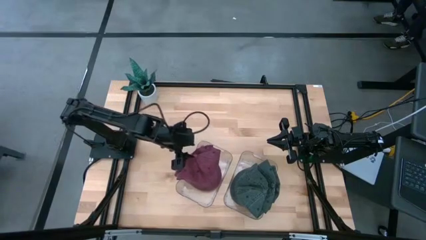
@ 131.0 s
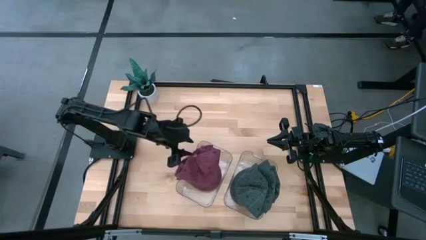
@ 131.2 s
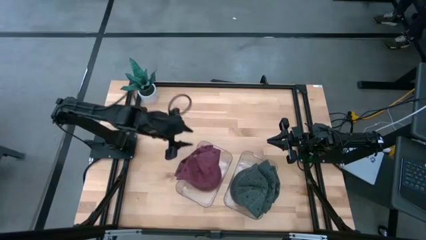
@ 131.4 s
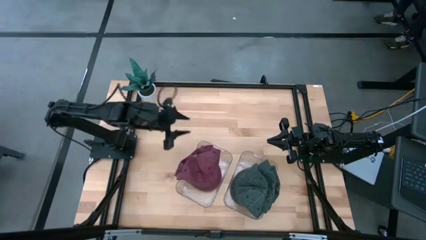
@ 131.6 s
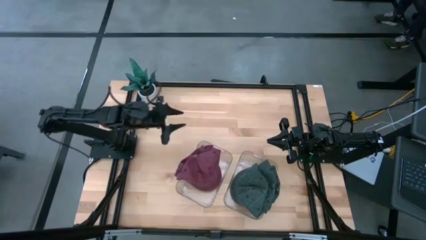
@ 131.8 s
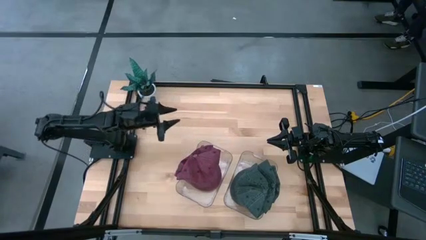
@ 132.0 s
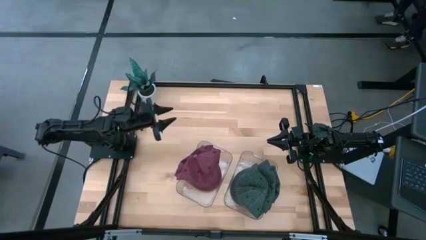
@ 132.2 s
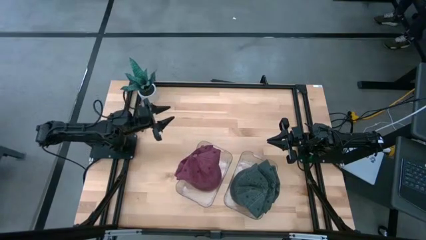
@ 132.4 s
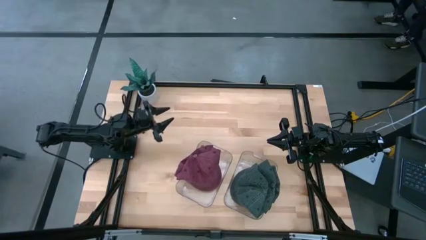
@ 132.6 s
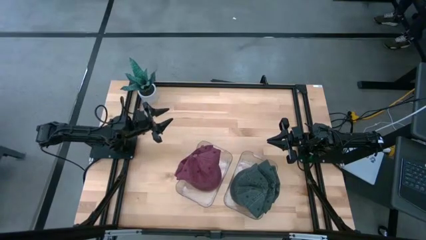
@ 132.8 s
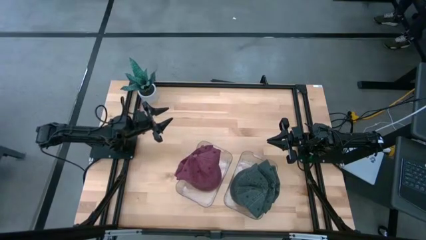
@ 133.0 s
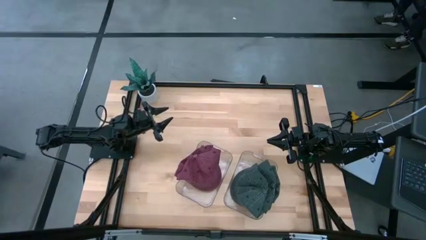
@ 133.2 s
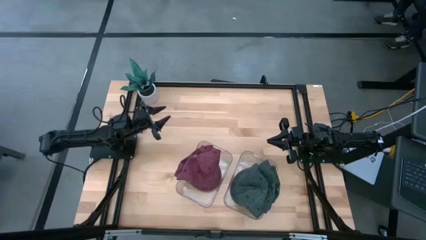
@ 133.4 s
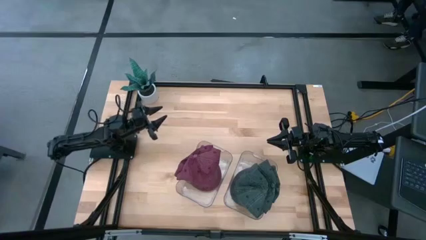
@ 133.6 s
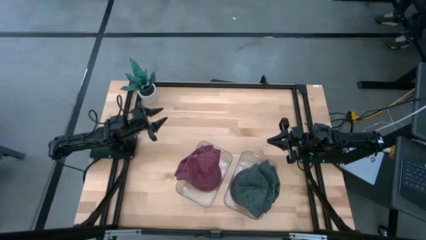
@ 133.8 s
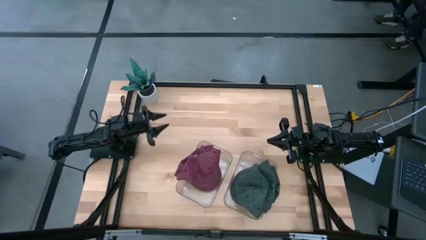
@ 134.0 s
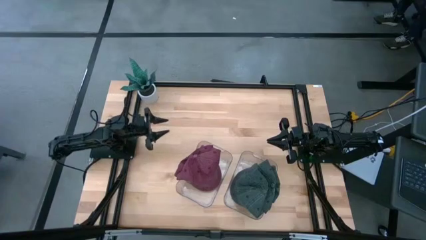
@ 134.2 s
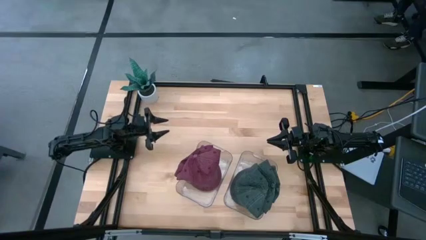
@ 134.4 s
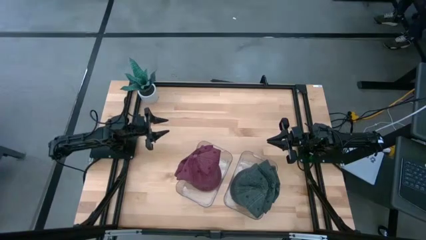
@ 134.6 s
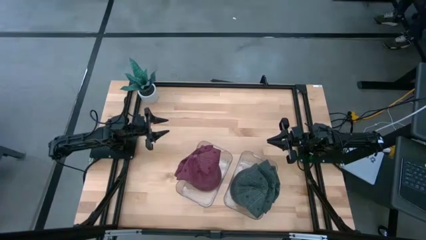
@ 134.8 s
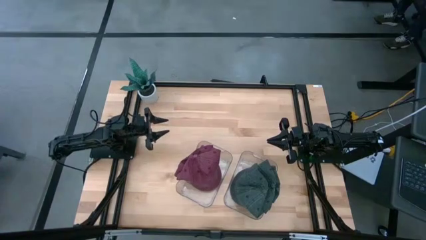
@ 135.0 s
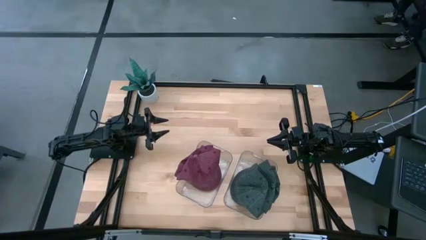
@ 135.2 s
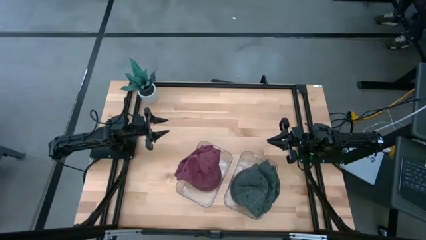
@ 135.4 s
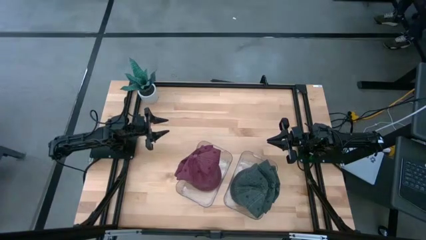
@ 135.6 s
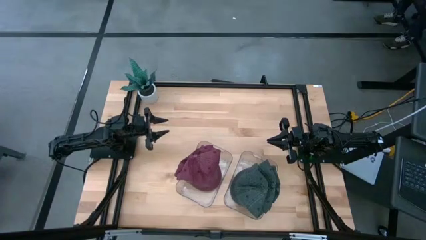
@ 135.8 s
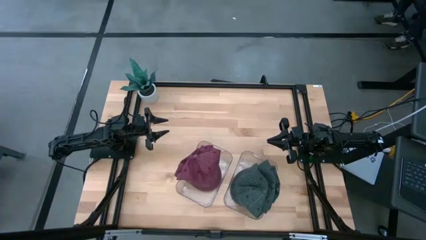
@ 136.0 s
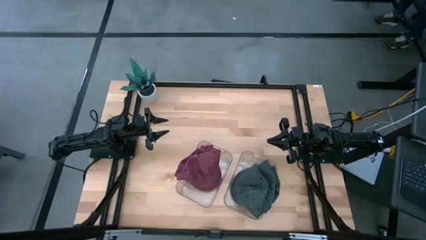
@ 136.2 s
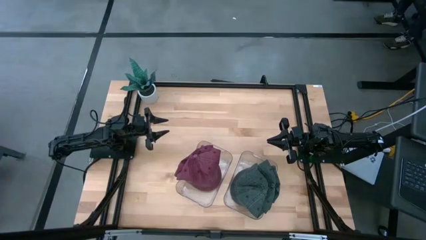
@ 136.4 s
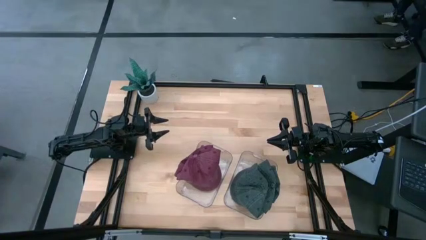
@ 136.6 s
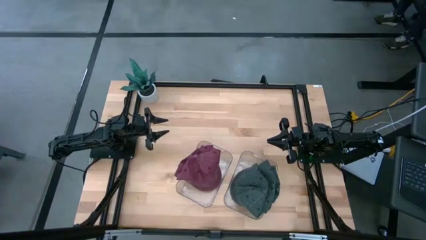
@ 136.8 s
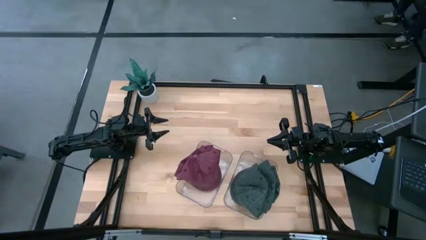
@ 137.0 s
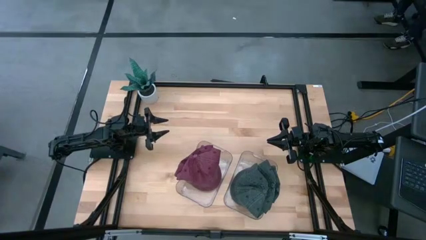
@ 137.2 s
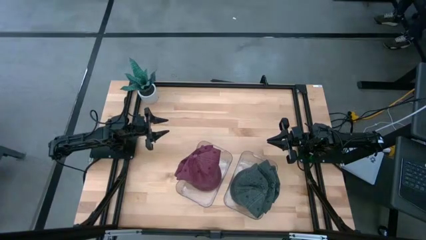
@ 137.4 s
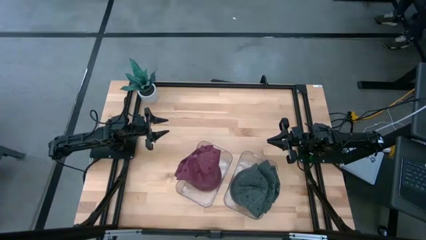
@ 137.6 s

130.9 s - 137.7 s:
Task: Pick & Place hat
Return to Home Position

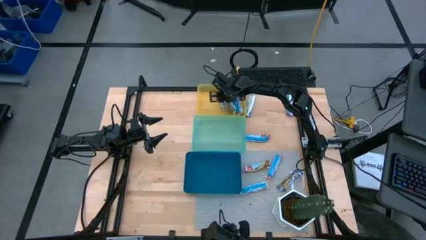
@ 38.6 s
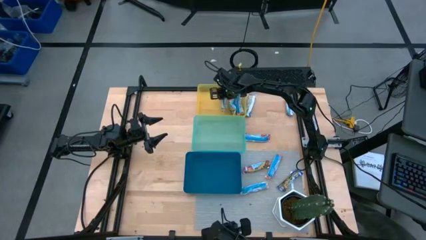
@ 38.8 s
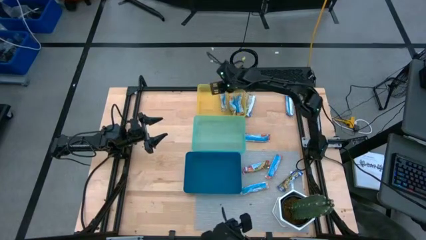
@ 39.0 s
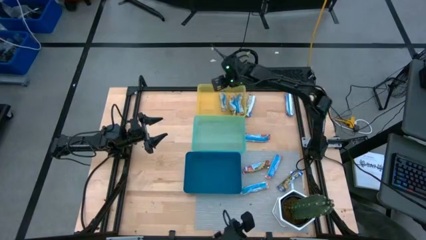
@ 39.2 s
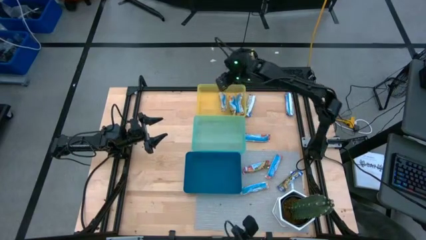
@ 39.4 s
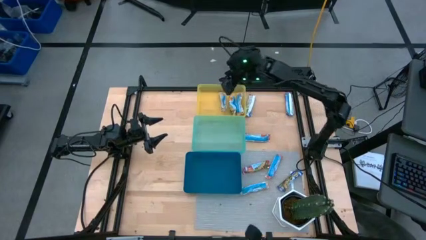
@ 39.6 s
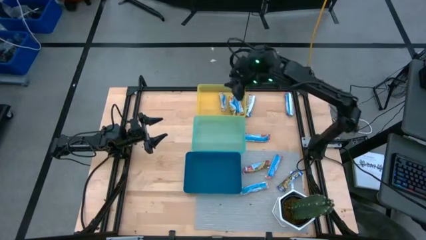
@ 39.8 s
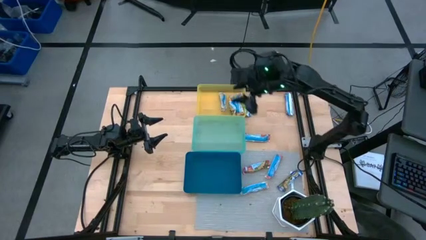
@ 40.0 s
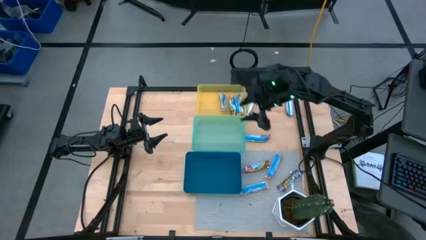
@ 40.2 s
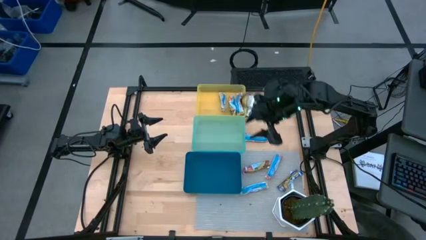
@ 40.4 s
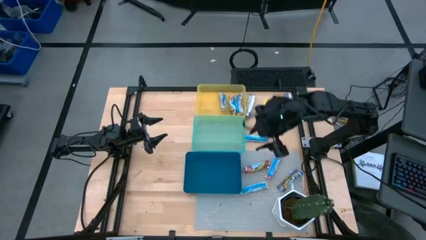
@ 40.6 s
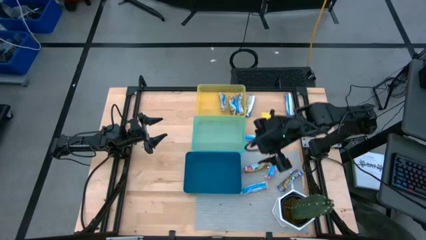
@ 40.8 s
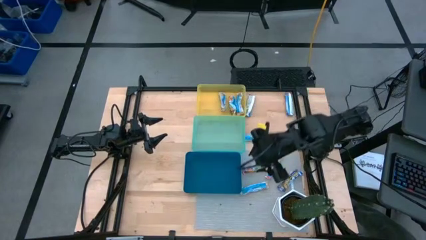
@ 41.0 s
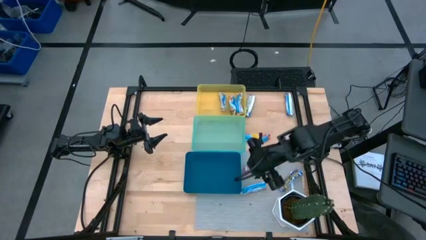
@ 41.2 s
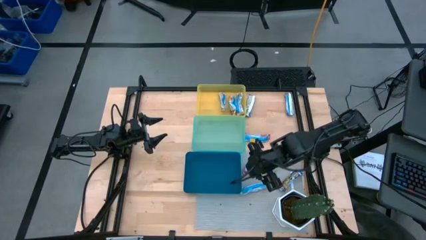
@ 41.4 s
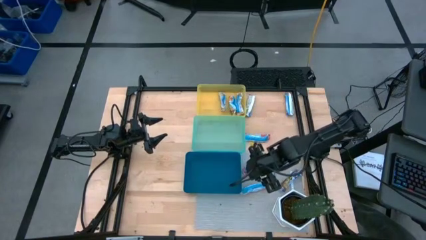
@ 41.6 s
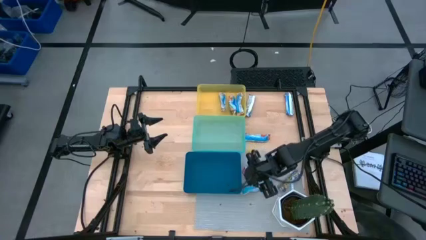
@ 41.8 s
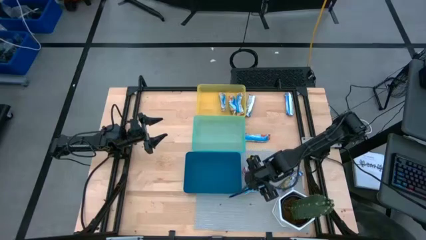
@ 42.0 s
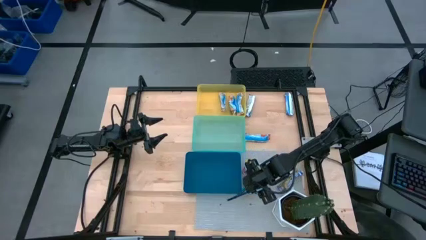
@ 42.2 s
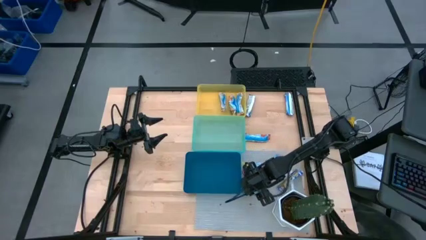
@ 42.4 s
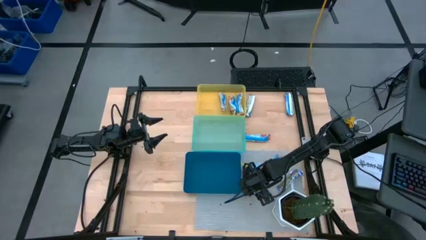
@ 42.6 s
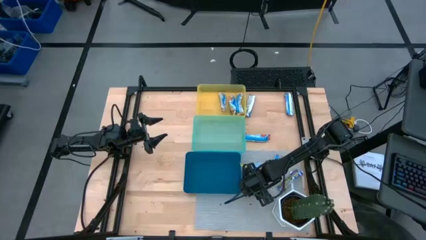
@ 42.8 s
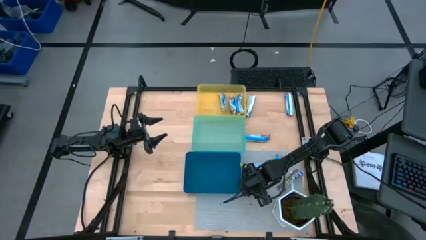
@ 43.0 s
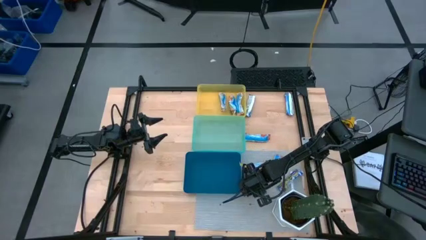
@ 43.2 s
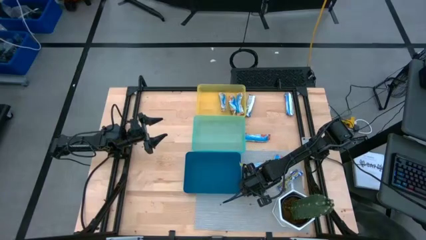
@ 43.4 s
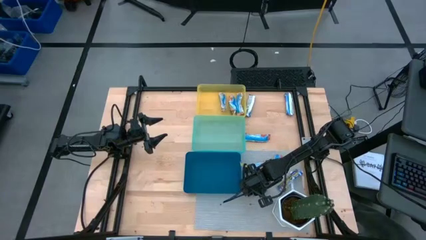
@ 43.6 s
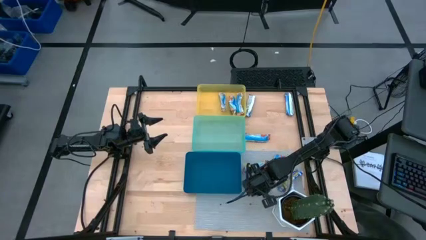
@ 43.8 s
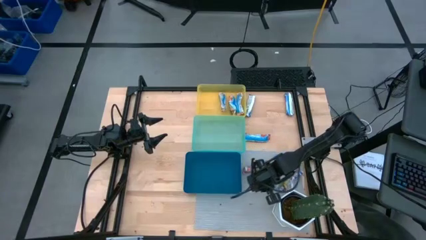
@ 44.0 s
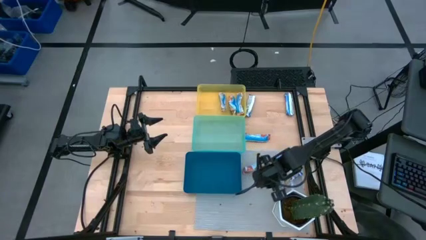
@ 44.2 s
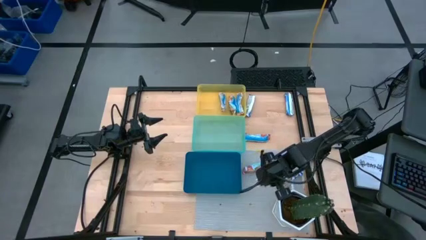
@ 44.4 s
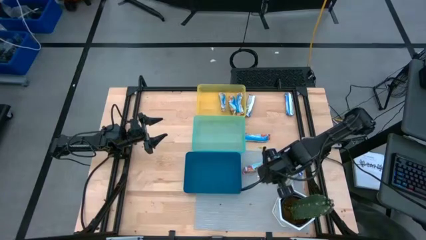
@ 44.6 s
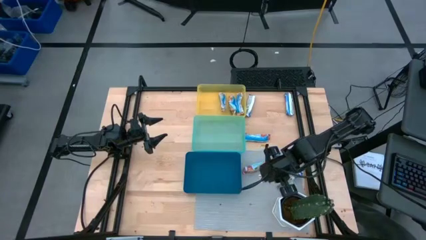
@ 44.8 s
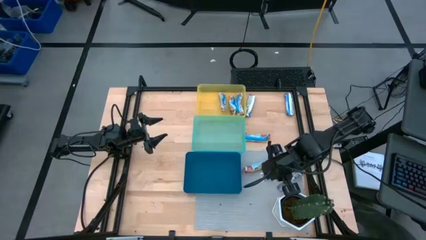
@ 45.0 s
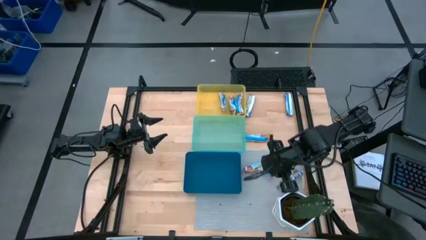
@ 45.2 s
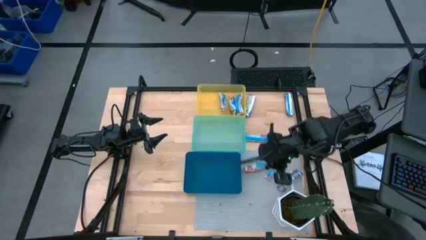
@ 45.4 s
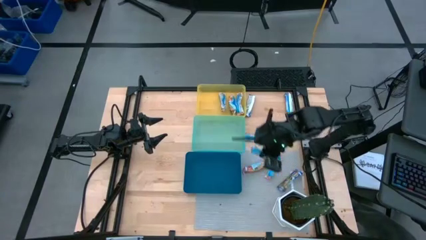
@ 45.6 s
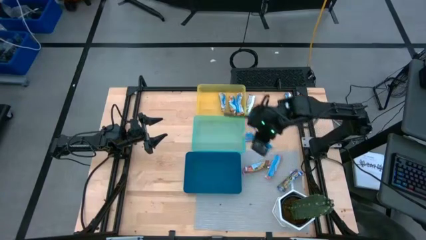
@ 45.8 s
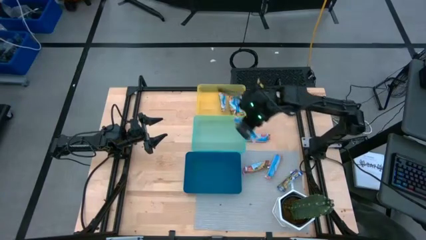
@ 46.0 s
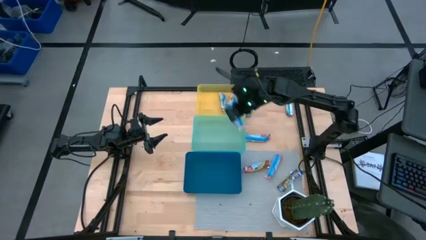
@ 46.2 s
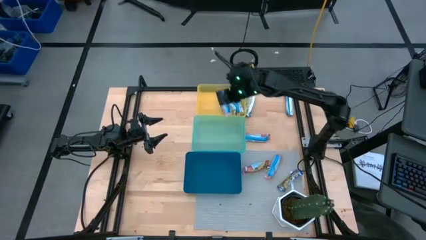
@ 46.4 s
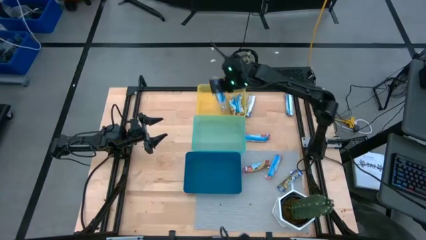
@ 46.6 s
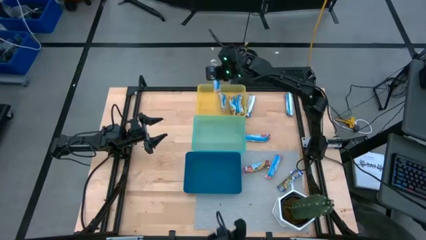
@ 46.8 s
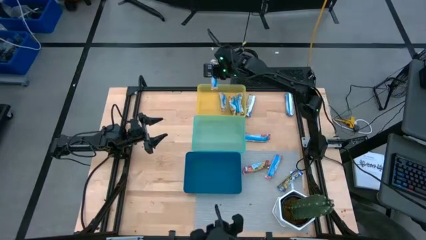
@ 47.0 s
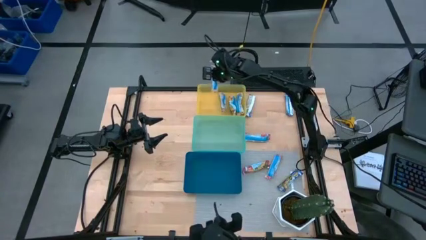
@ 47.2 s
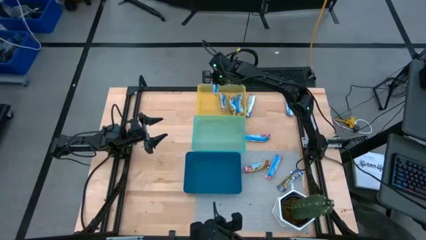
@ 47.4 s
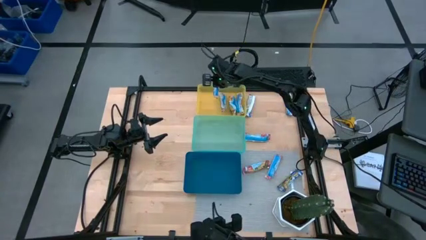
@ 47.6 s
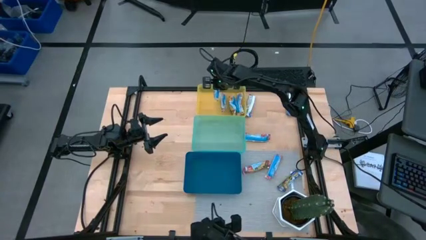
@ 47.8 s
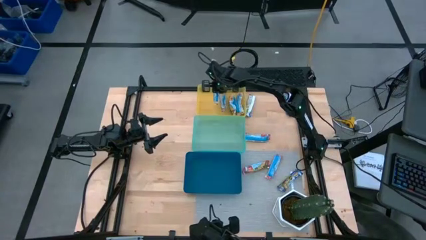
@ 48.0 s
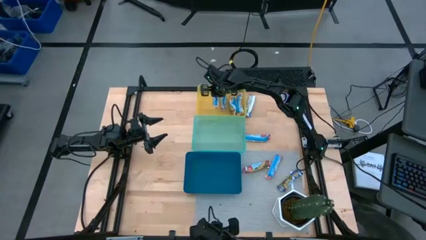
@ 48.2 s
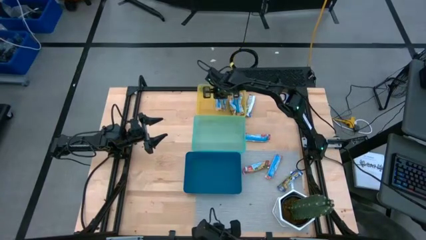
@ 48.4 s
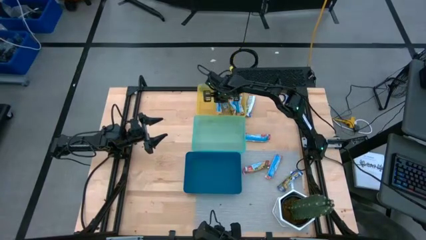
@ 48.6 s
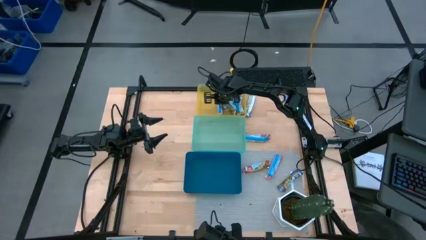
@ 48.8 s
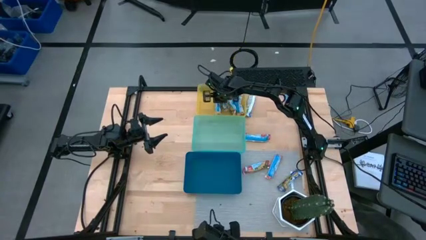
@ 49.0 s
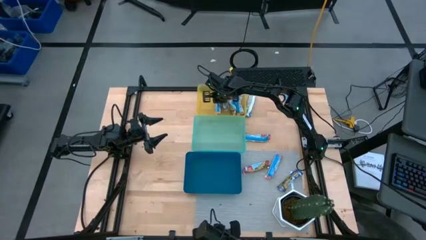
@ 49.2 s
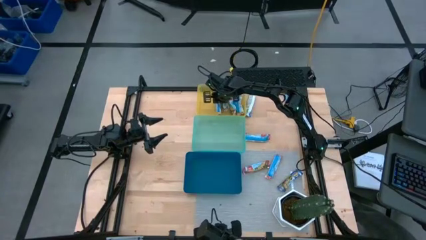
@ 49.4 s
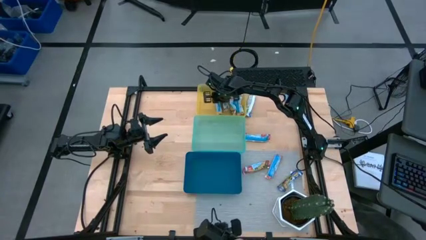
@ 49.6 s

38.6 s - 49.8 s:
Task: Pick and place Granola Bars by type
Put the yellow granola bar into the yellow bin
